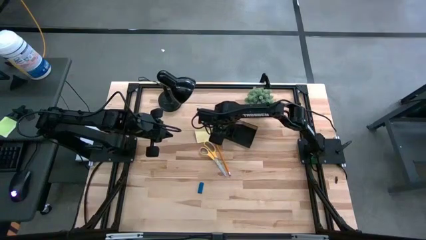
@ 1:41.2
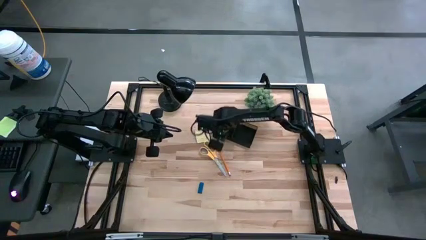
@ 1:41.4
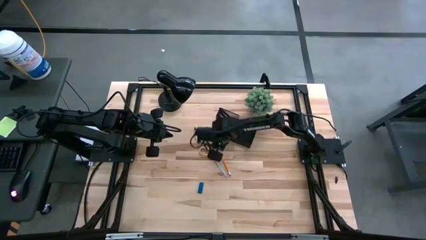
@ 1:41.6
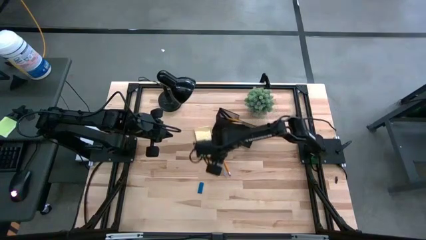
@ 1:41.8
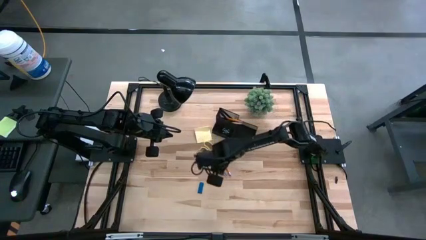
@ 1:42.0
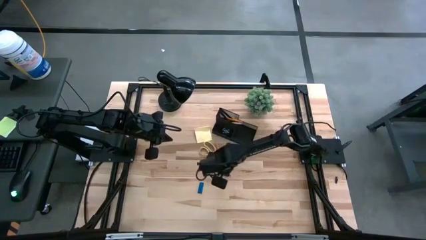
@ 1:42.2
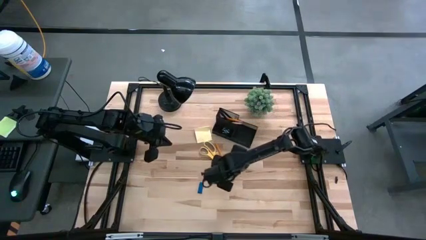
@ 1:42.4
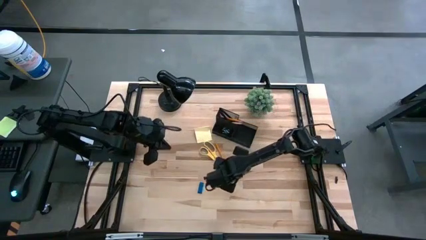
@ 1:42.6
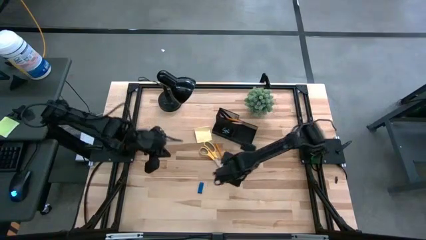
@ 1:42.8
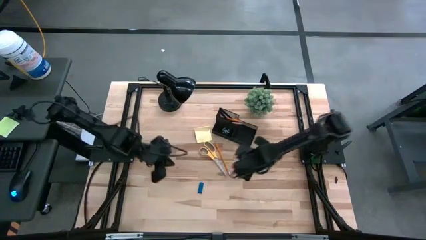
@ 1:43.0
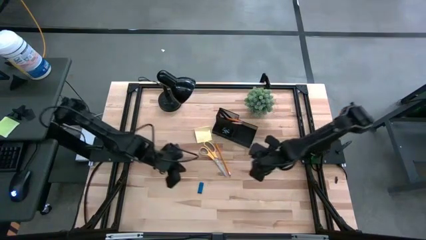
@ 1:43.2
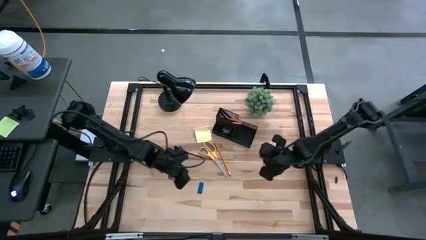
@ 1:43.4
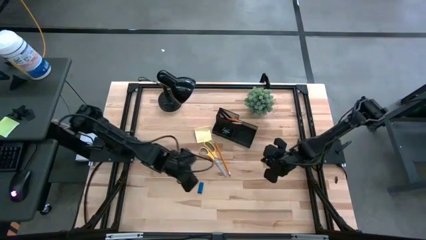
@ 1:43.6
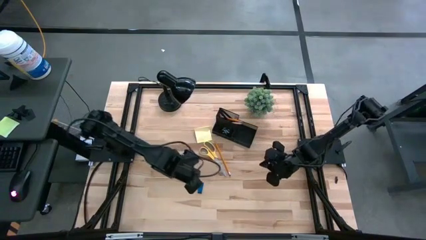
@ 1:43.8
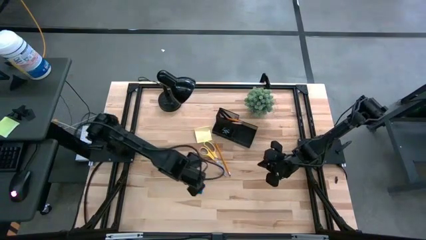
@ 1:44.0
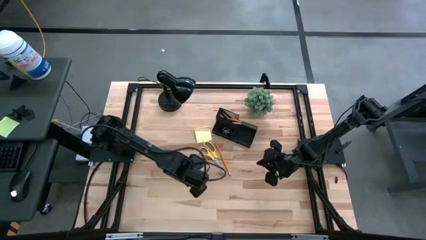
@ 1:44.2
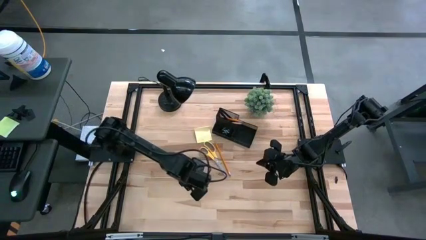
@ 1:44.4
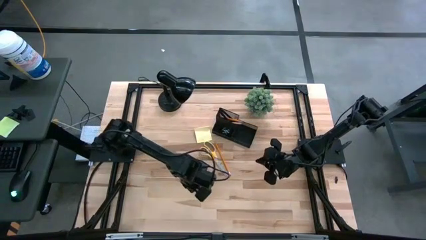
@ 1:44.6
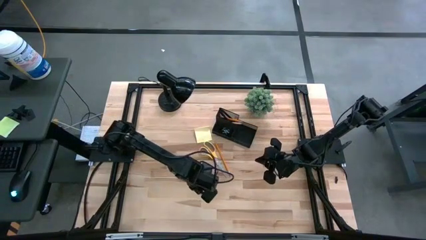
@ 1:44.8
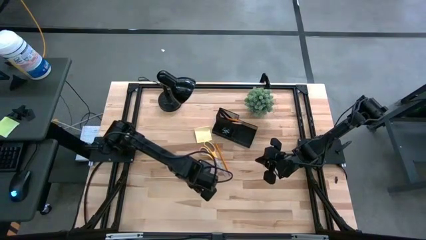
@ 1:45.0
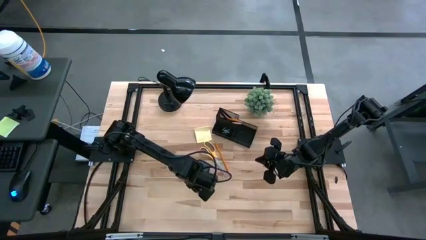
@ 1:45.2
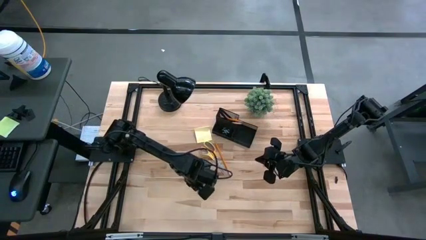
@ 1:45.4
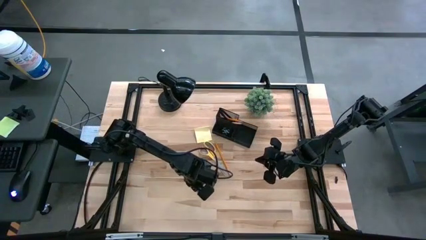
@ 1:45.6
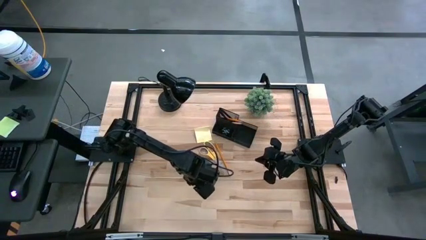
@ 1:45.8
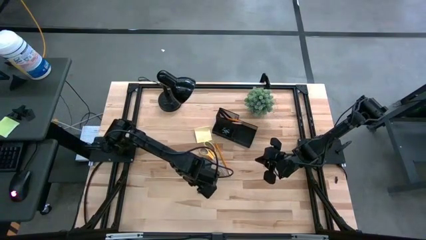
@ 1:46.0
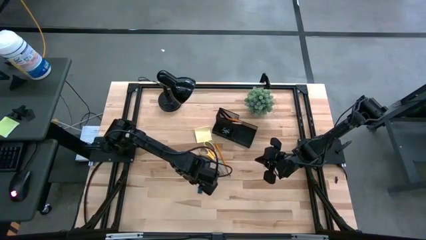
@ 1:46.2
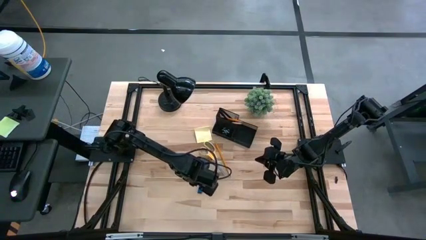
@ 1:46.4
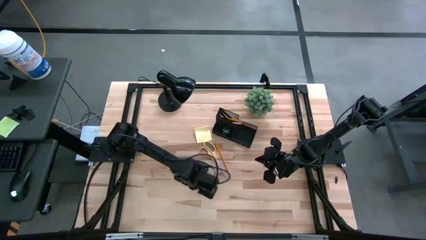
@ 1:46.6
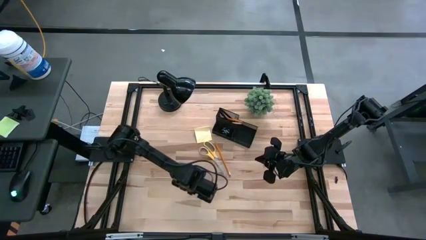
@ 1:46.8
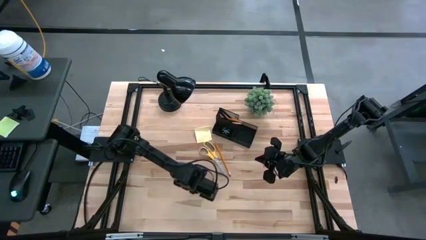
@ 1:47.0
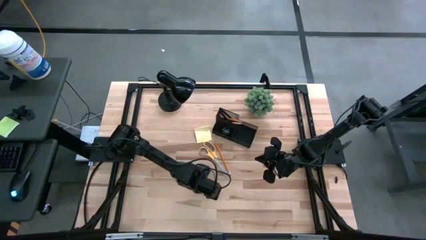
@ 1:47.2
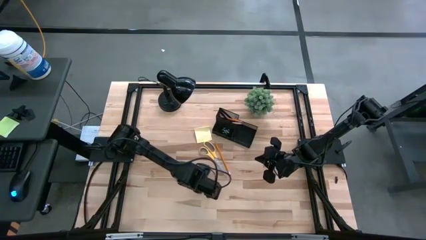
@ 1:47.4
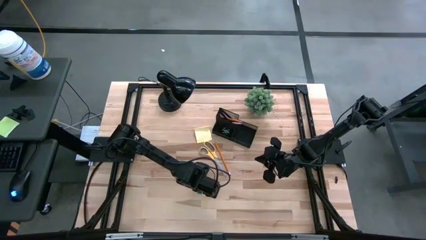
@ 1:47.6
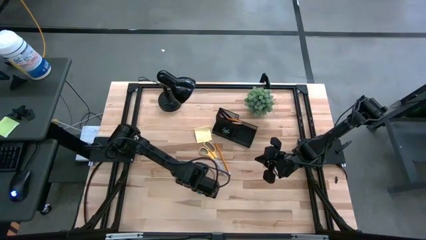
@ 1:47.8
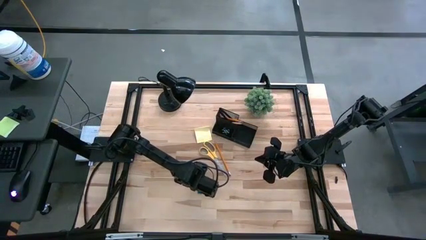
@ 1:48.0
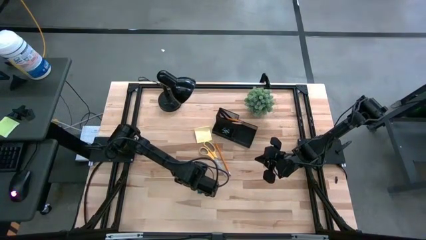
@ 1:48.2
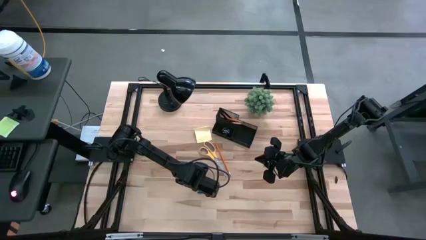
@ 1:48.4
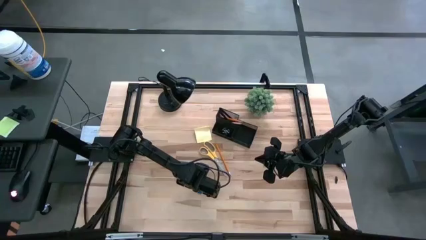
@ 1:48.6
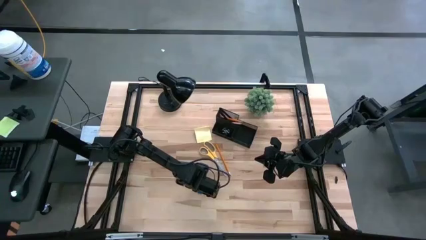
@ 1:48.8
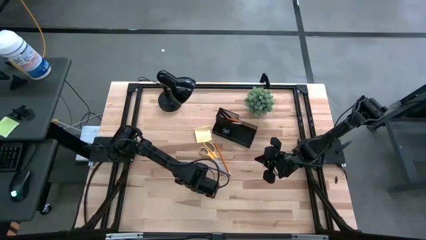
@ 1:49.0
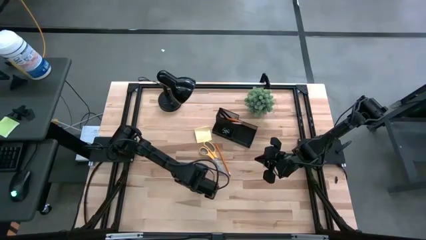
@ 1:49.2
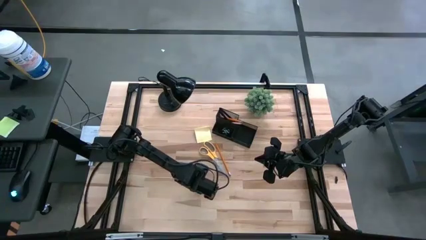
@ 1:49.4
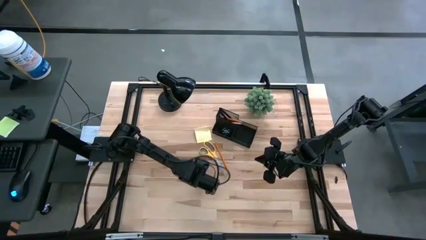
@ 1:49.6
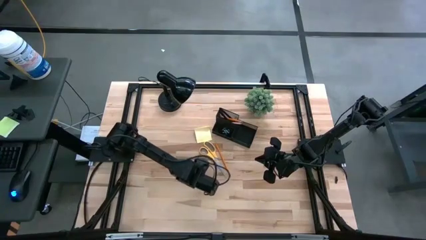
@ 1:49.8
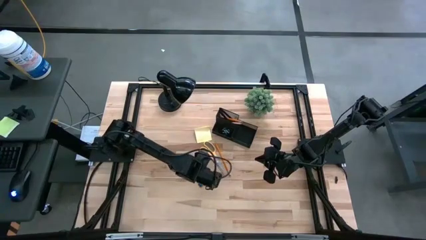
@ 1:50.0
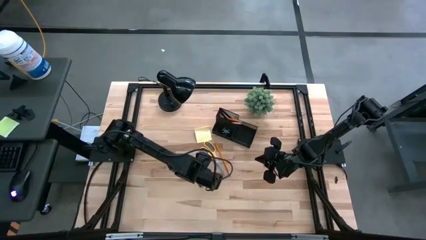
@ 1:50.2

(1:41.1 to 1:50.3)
Task: Pick and place office supplies into organizer
Put the eraser into the desk organizer

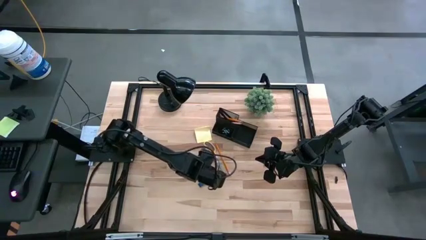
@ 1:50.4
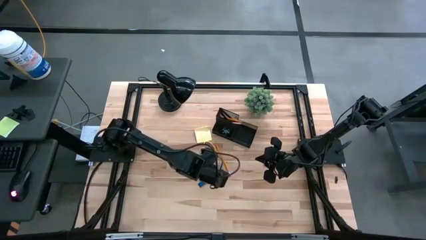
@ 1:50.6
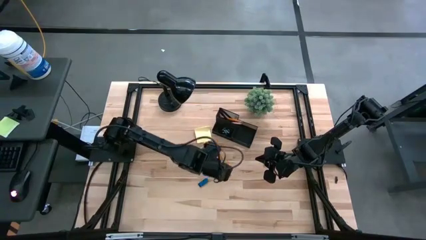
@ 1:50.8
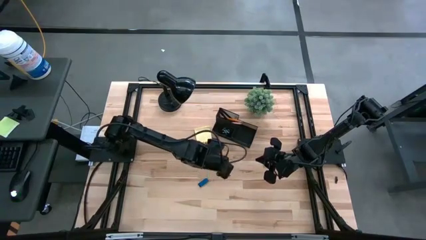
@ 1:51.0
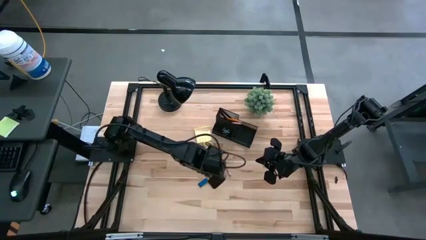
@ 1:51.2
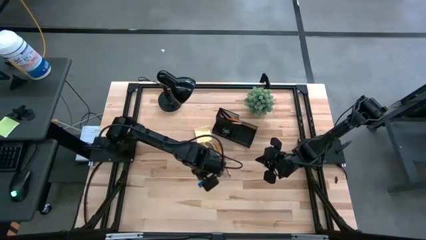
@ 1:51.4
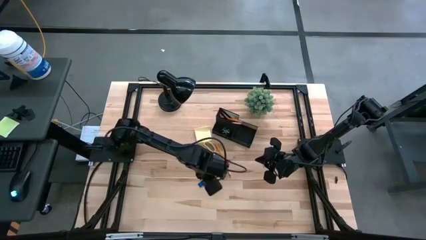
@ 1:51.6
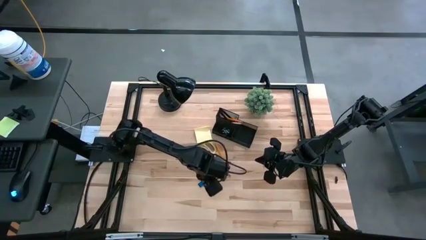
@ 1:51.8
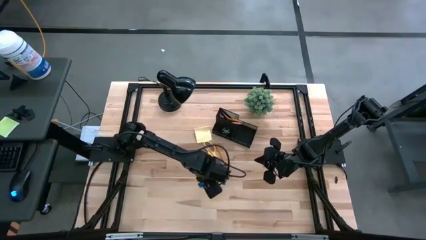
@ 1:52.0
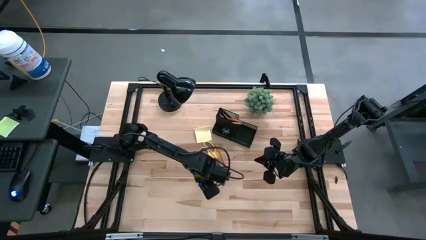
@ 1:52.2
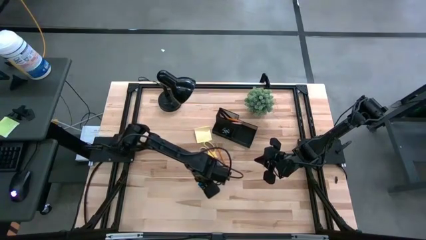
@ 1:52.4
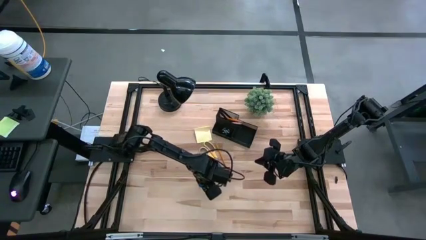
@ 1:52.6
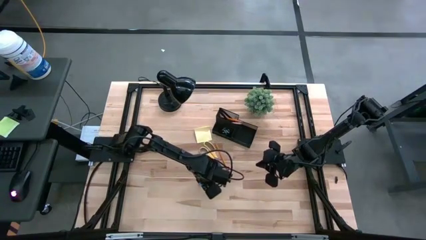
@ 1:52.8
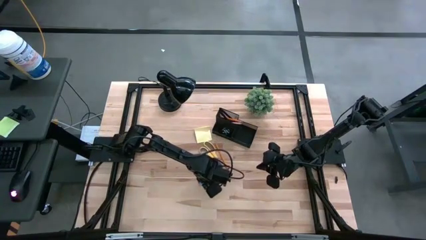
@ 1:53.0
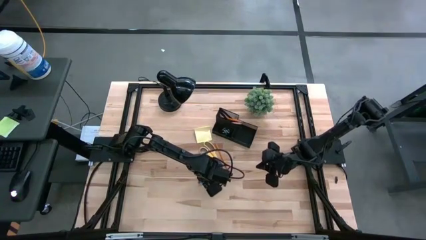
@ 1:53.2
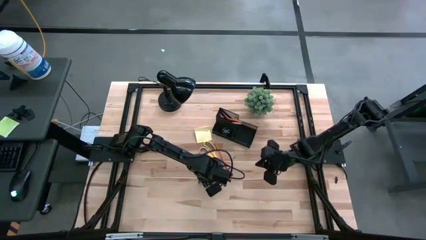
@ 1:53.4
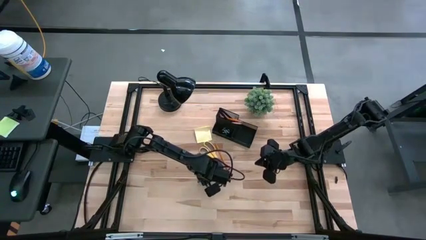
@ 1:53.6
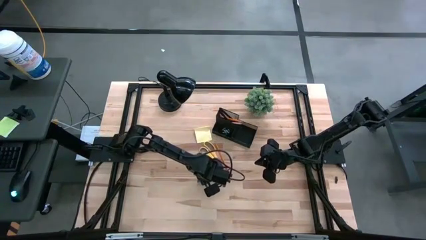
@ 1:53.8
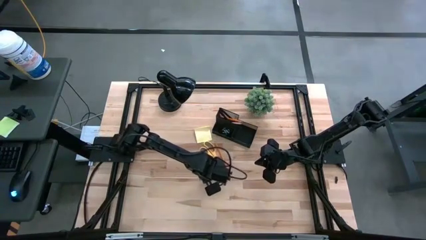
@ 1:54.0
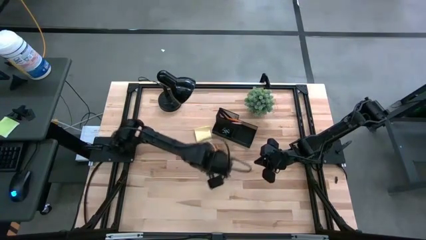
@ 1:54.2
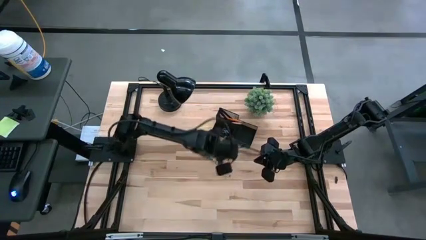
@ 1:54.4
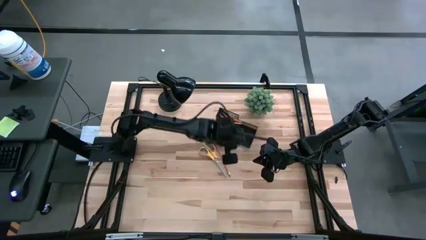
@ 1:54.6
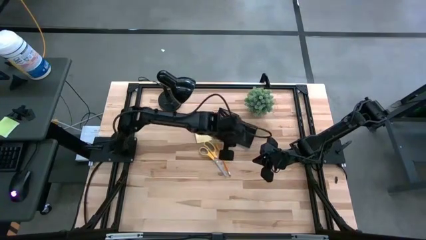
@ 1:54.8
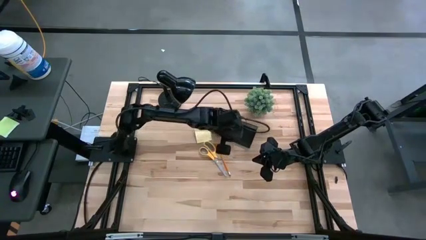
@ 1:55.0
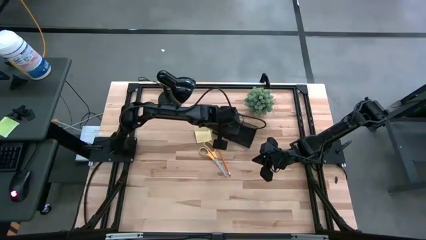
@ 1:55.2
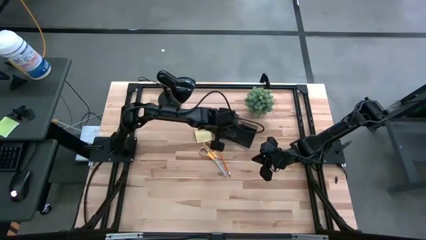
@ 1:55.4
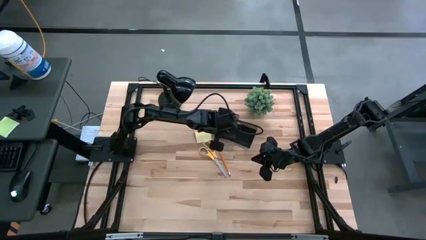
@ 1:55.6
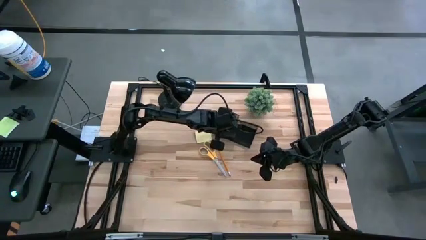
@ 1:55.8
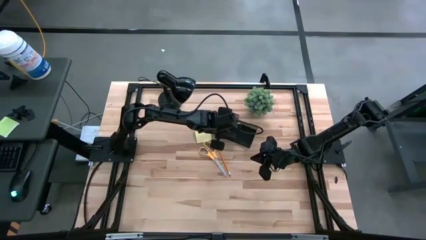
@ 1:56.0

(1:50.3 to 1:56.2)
Put the eraser into the desk organizer

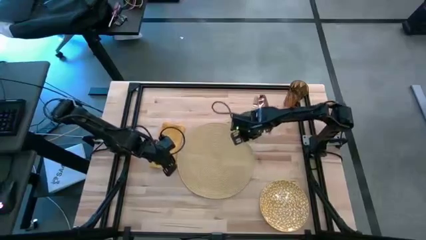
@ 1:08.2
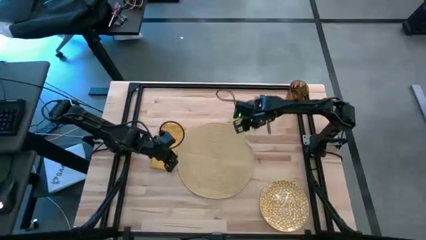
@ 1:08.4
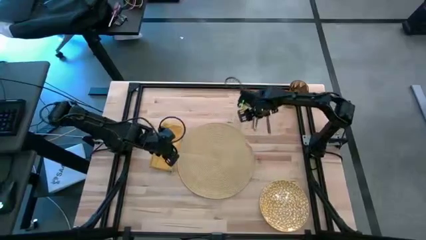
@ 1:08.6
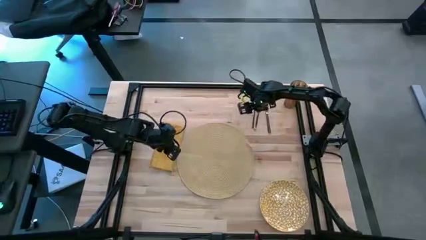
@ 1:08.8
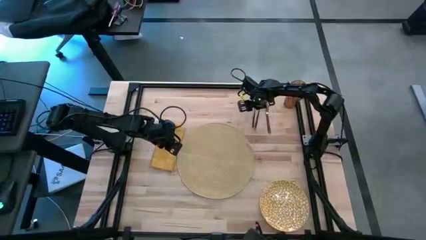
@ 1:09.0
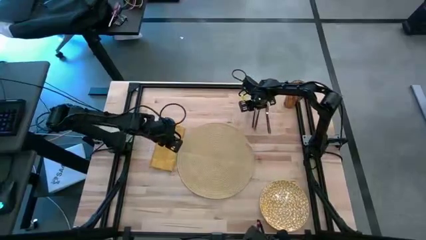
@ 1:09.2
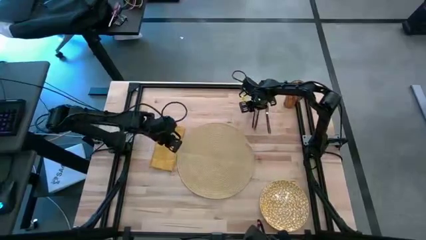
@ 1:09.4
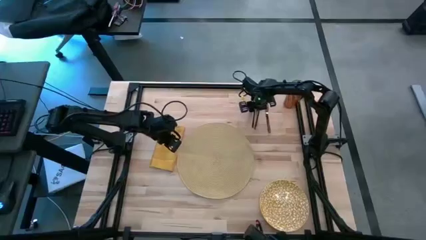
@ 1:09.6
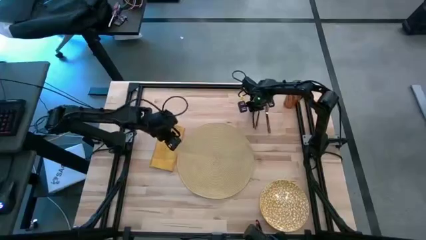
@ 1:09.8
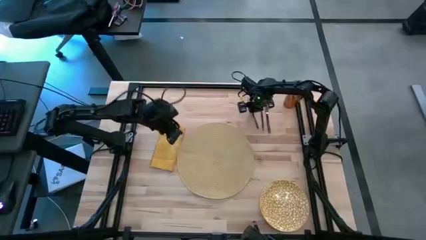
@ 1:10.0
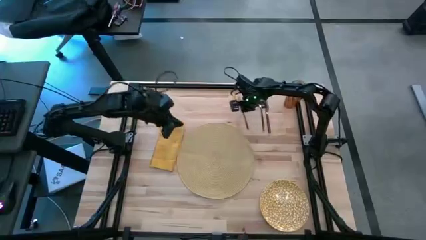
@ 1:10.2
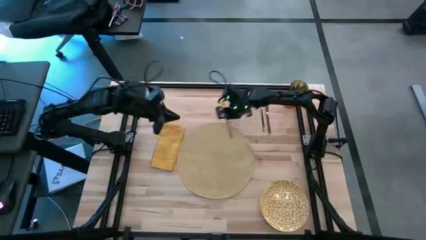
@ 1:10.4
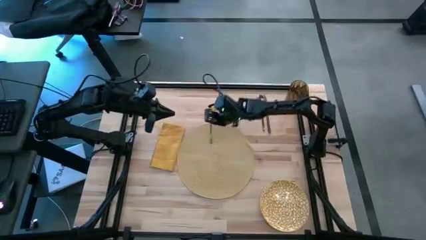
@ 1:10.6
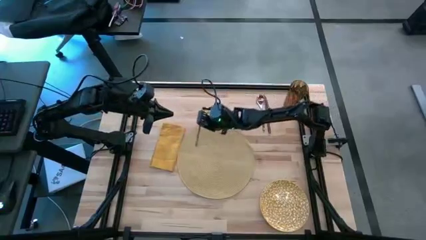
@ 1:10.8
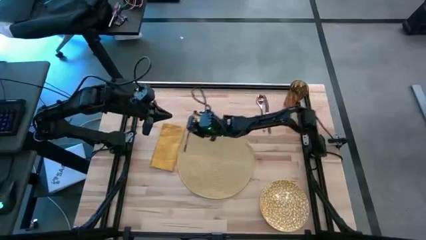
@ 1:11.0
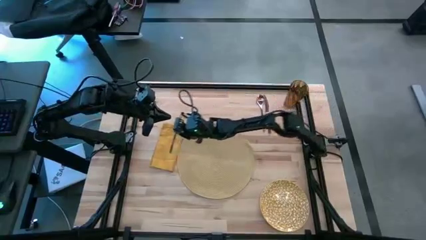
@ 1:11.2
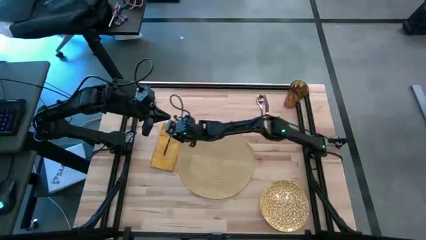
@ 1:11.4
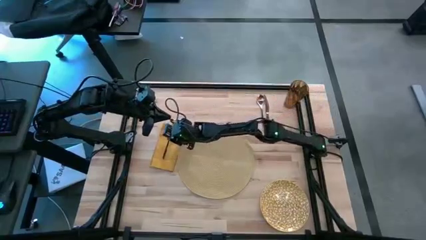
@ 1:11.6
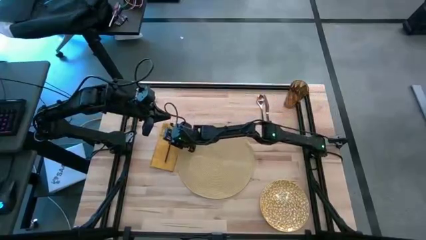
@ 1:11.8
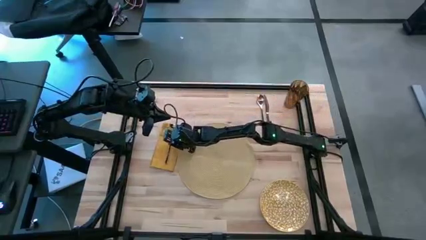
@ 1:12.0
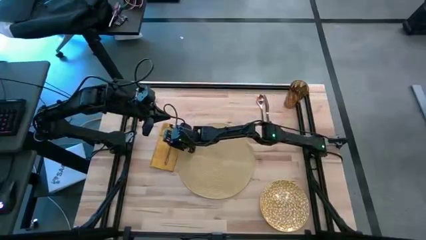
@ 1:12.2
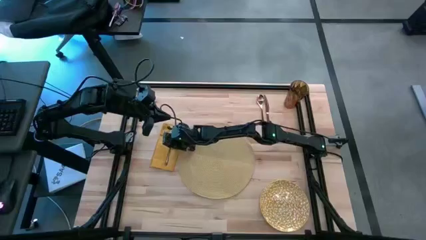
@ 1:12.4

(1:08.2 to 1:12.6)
Task: Set table place
Put the brown fork on the yellow napkin
